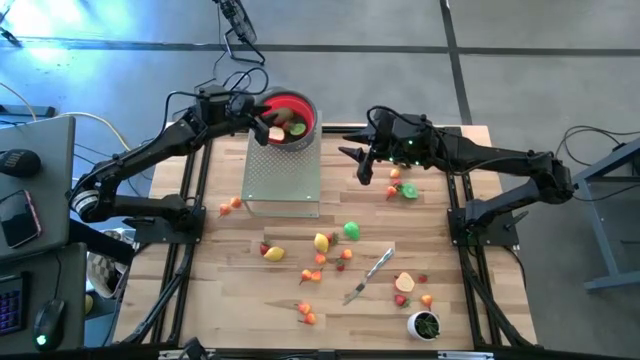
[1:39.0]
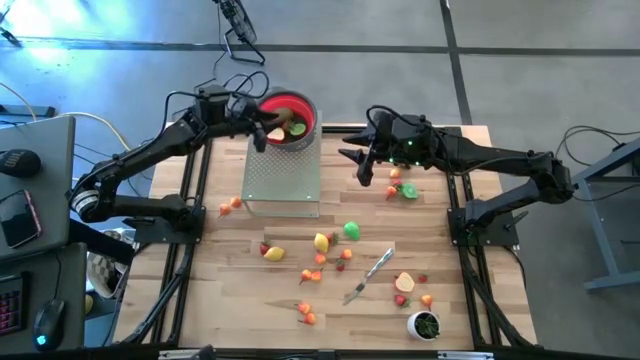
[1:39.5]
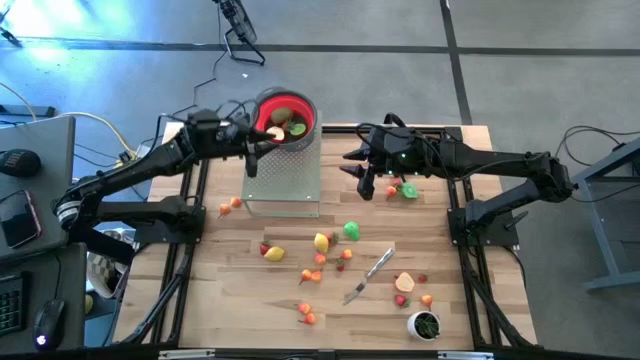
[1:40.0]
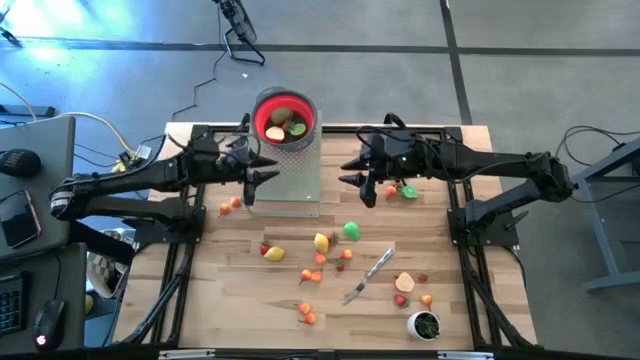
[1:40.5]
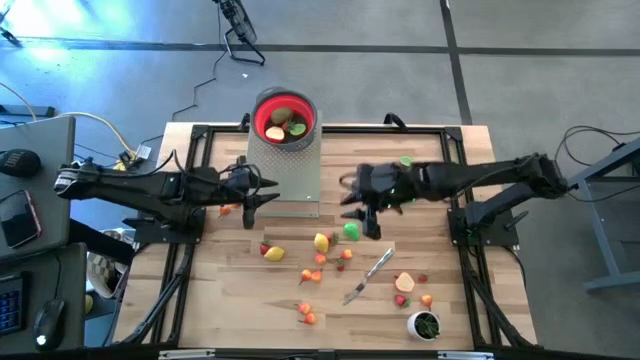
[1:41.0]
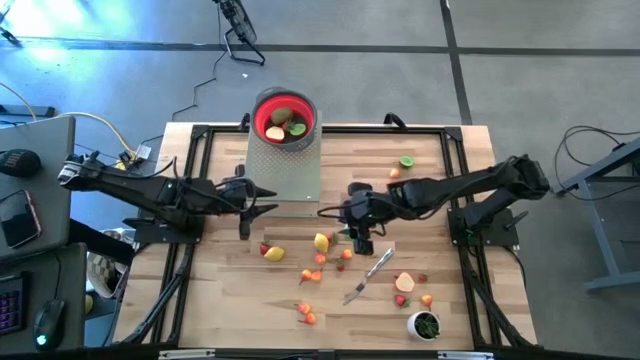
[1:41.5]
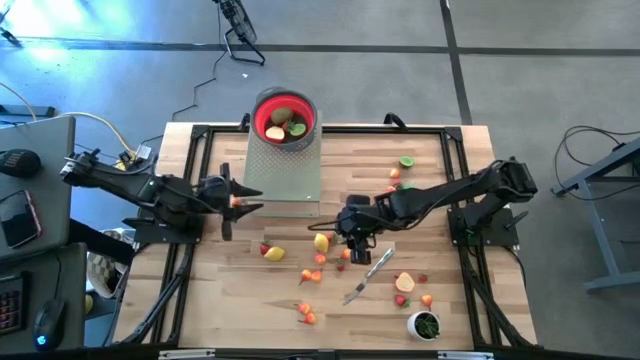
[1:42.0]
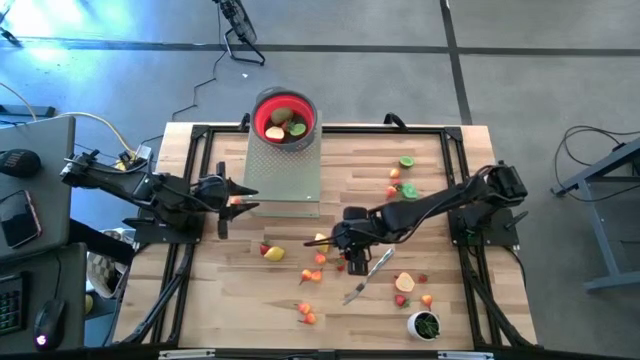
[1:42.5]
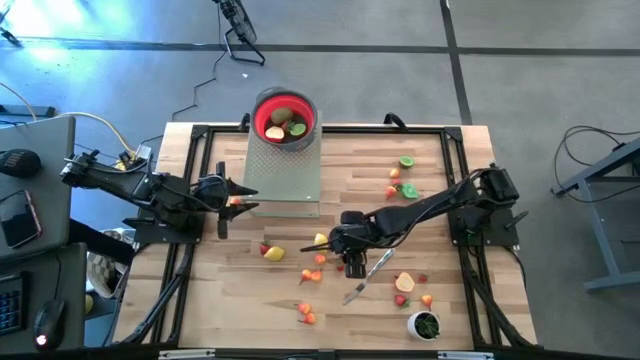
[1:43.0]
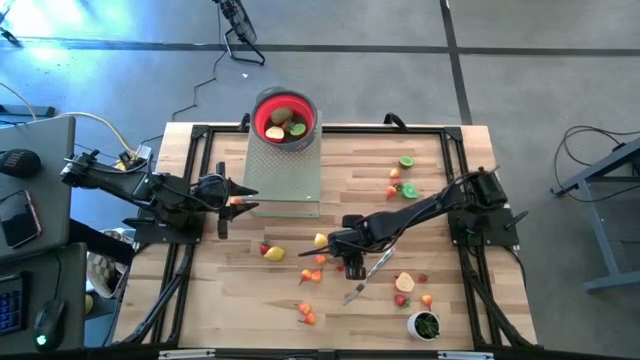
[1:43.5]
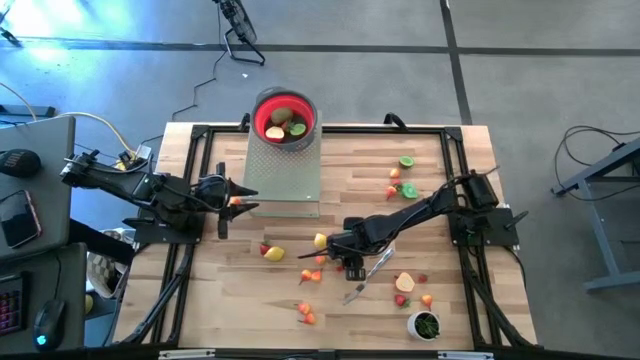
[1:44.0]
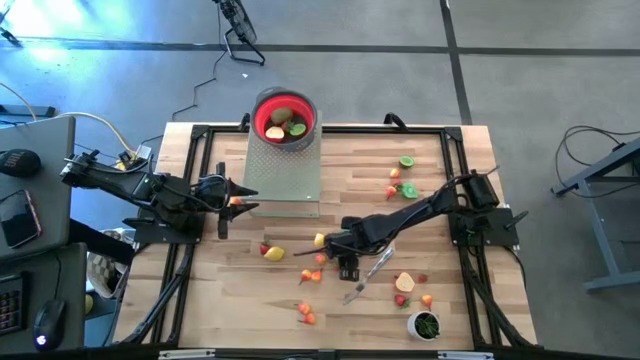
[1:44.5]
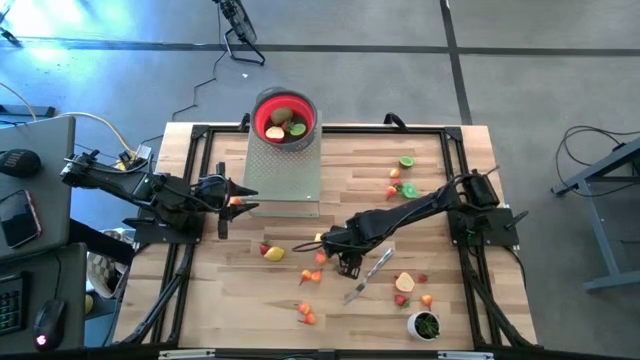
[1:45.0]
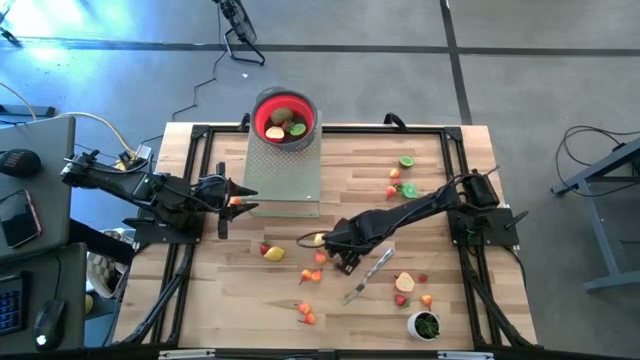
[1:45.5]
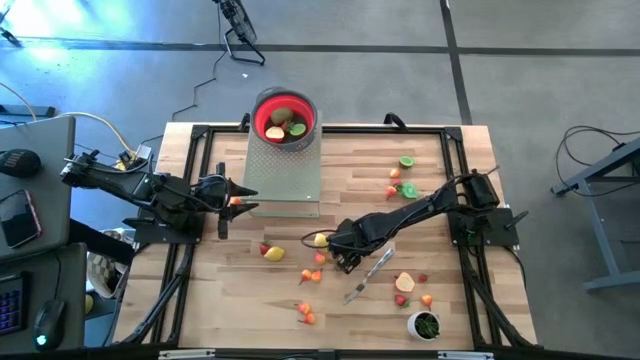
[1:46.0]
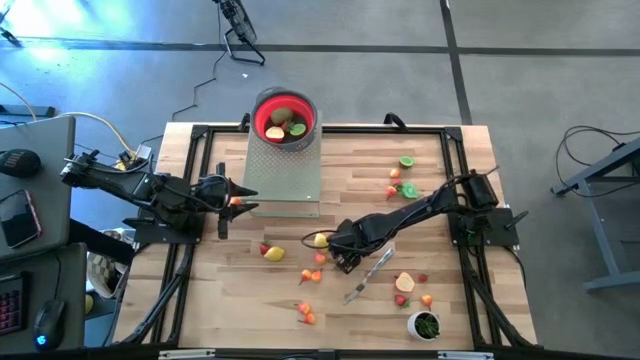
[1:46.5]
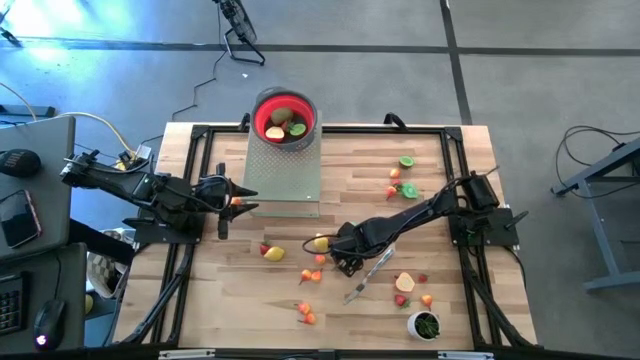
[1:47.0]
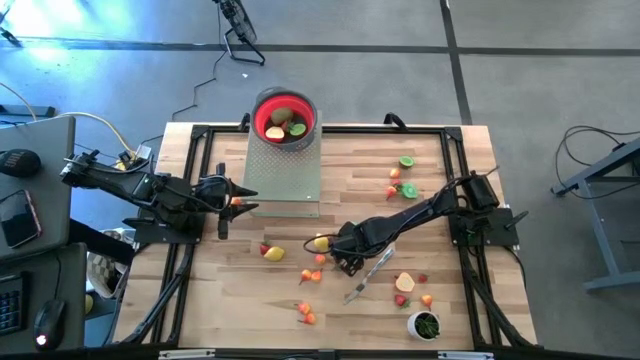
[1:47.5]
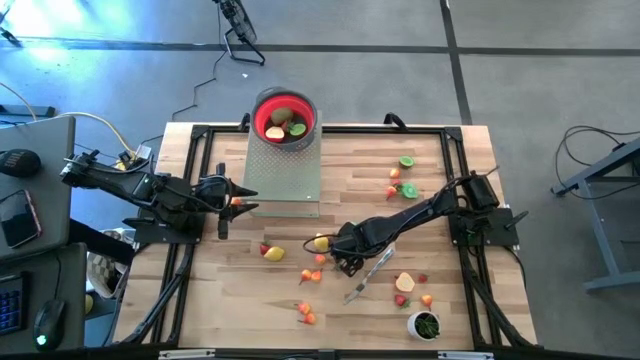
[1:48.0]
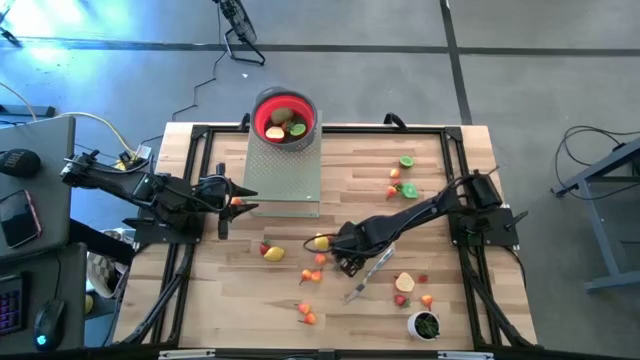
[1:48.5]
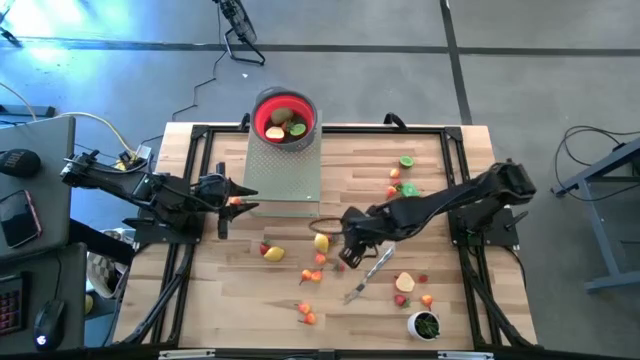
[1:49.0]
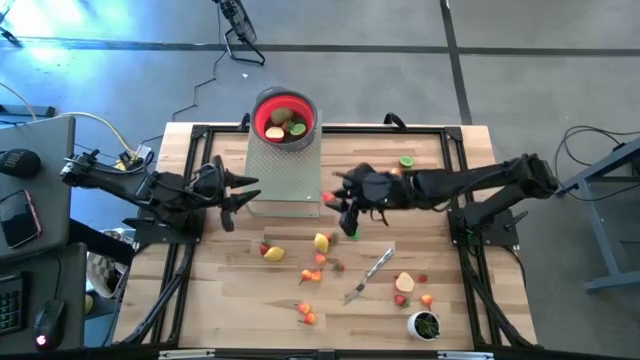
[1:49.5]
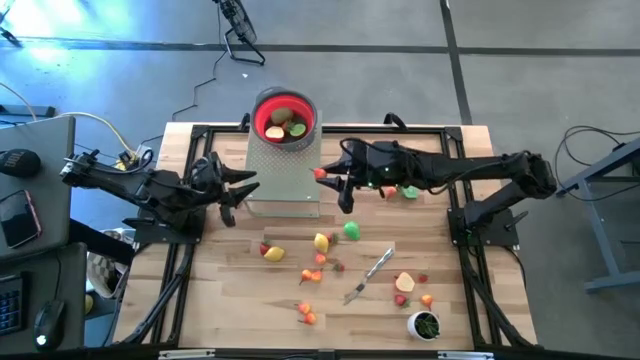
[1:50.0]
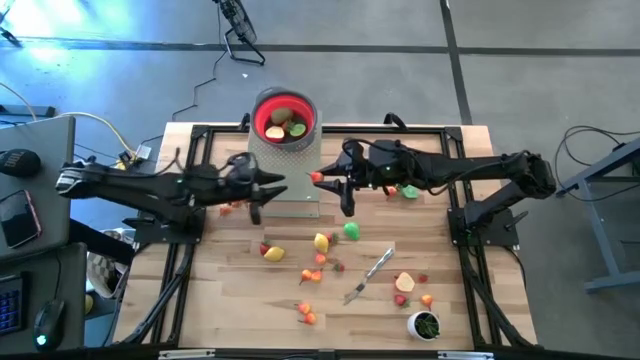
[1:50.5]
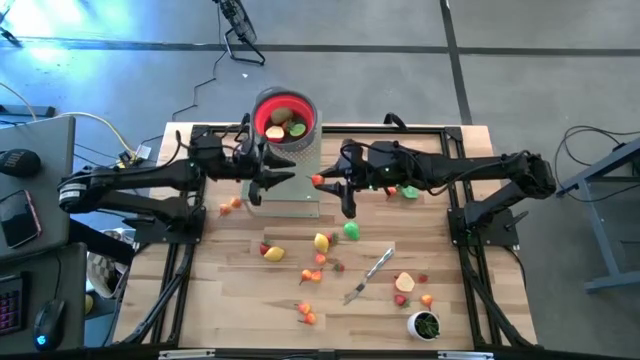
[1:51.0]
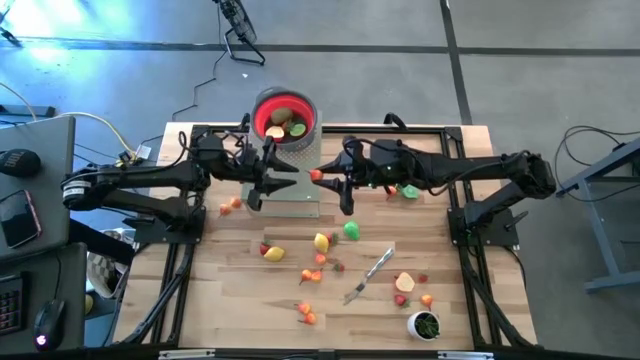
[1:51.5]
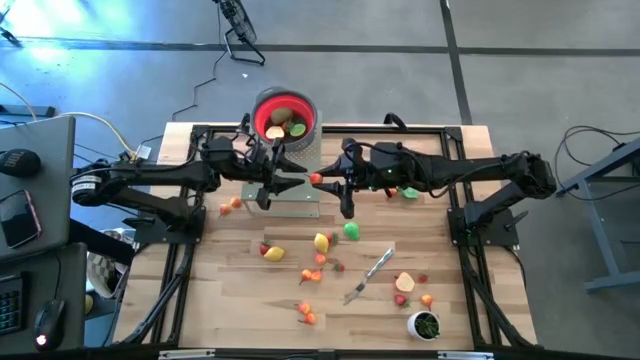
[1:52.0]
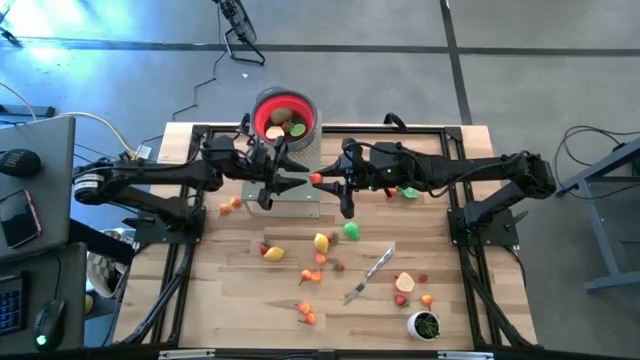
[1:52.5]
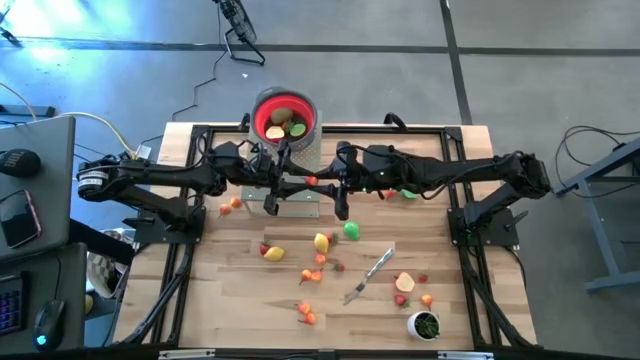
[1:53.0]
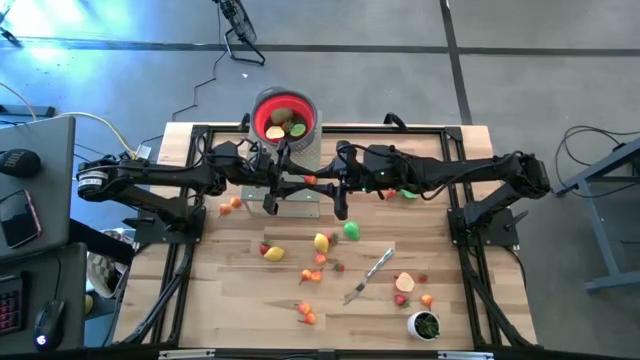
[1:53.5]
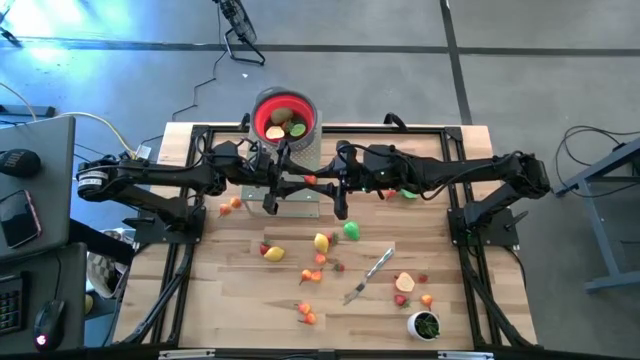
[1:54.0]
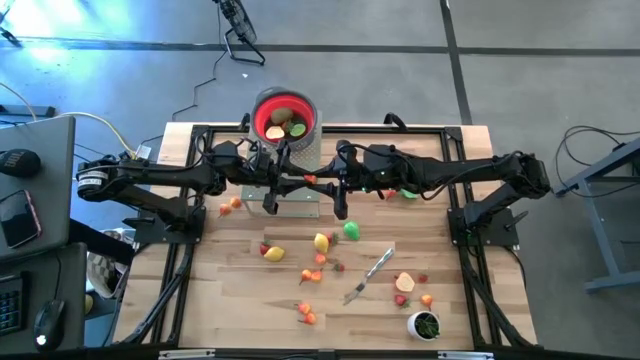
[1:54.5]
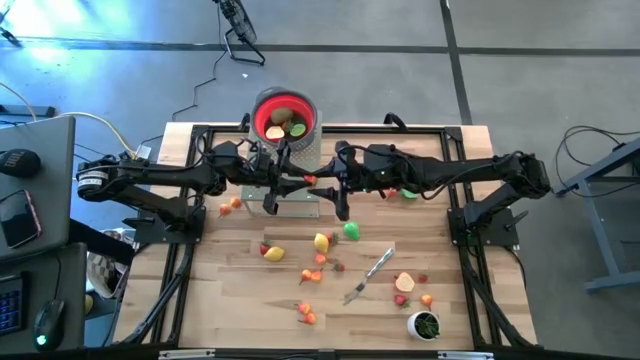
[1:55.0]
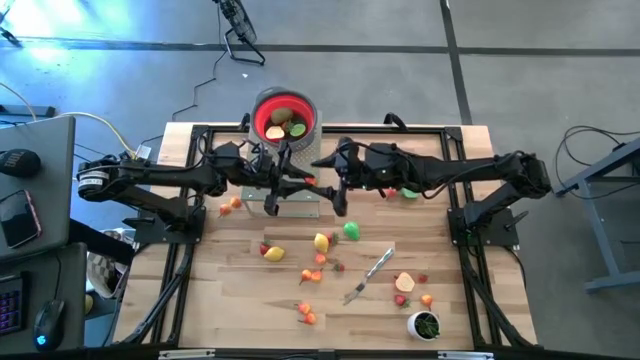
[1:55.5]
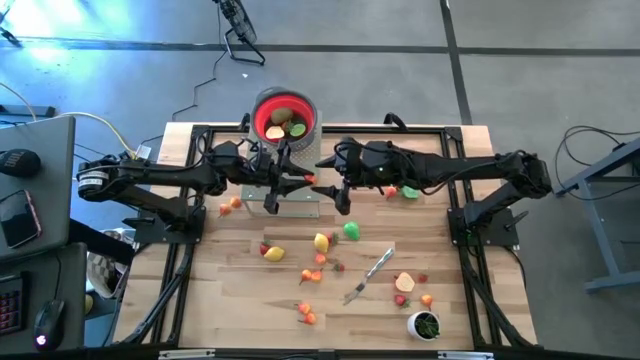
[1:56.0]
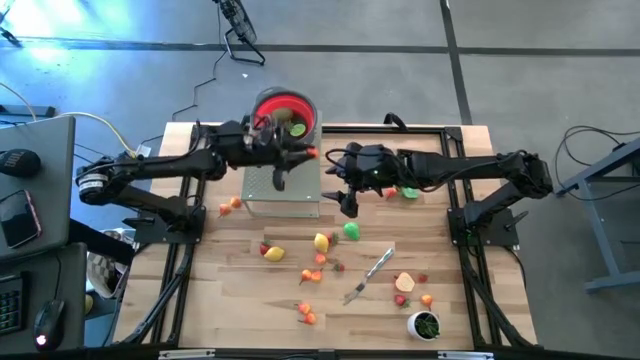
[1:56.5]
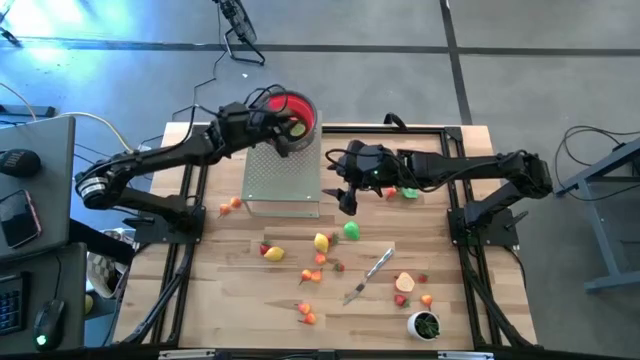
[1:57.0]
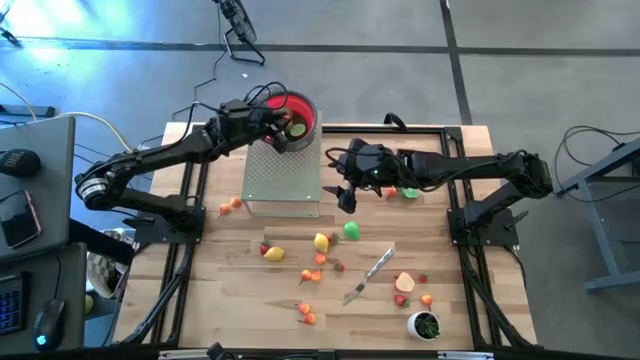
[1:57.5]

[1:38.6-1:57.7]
Task: Pick & Place Fruit
Put the orange pear into the red strainer on the shelf

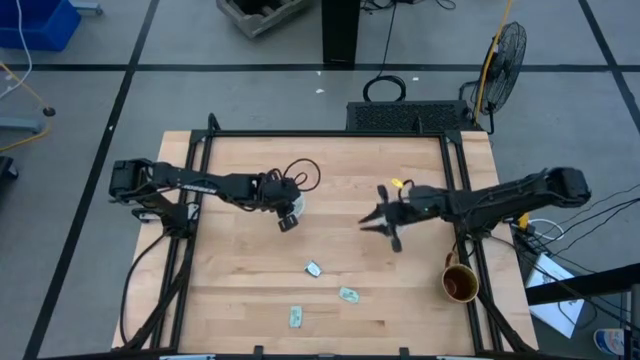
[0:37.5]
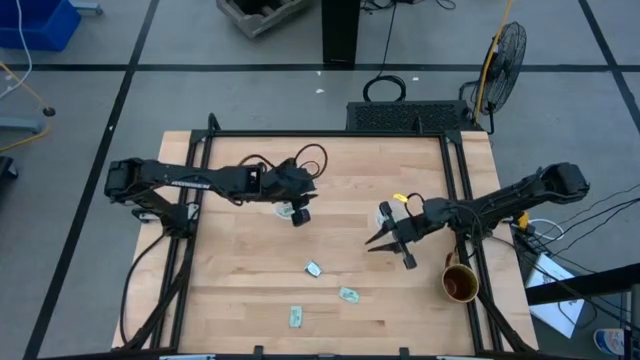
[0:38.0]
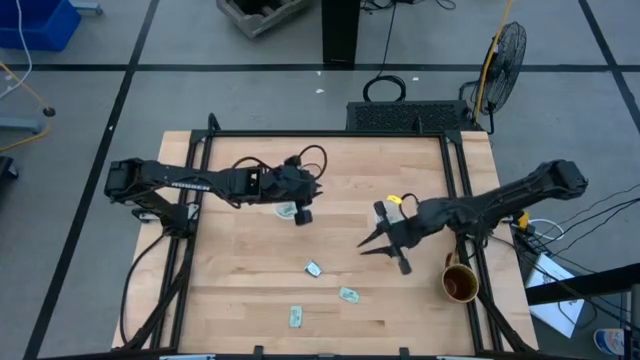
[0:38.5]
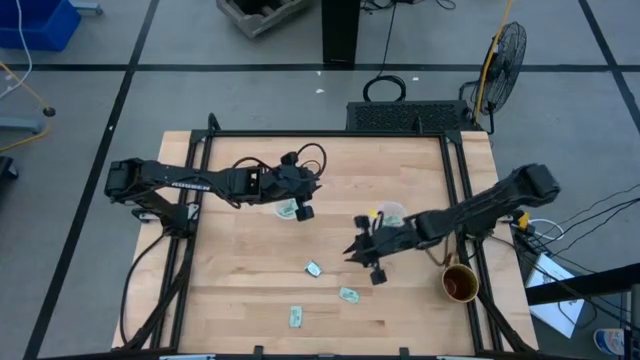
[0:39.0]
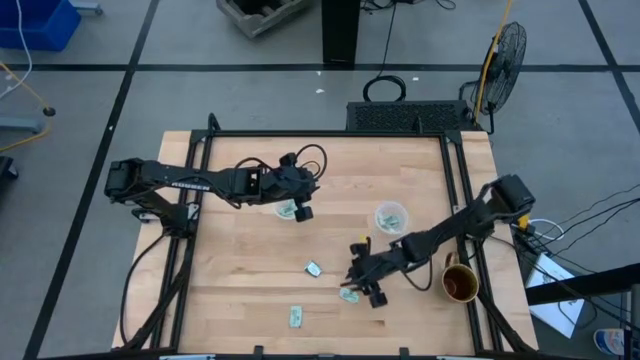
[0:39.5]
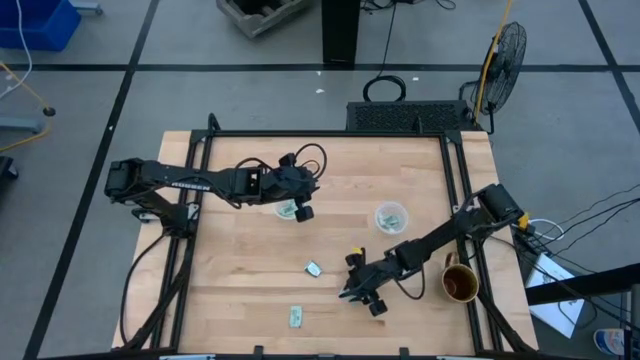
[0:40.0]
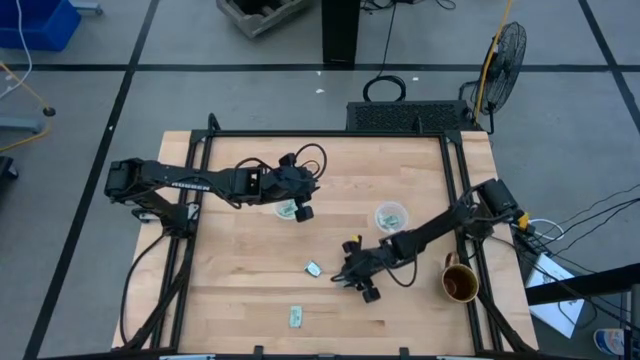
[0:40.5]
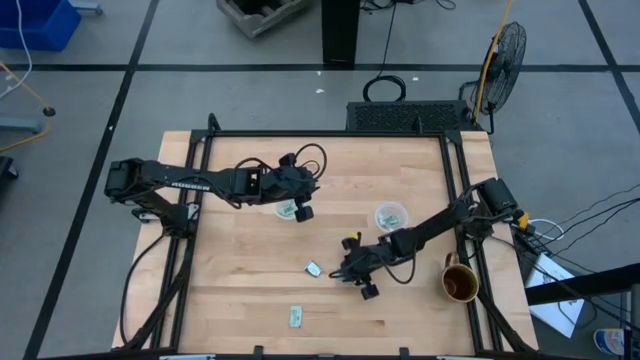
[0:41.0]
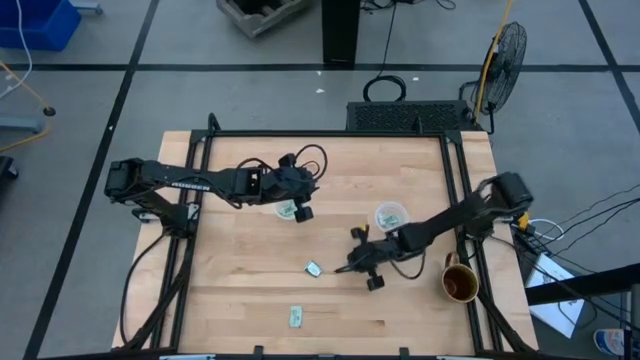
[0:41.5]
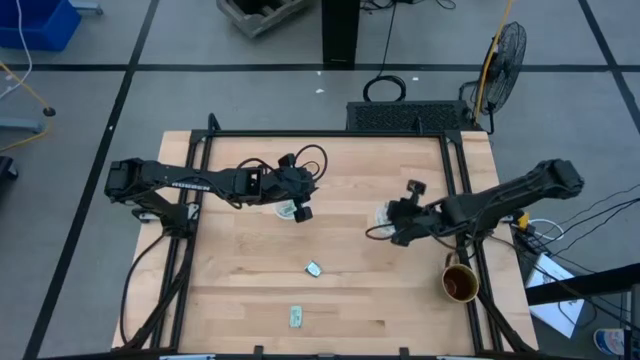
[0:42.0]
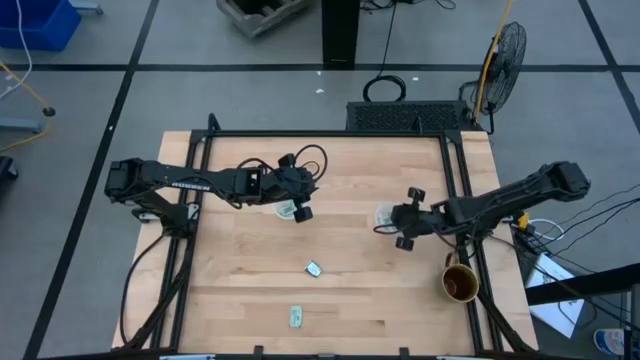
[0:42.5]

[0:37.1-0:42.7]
Task: Pick and place Stevia / Truvia into bins
Put the stevia packet into the right container
